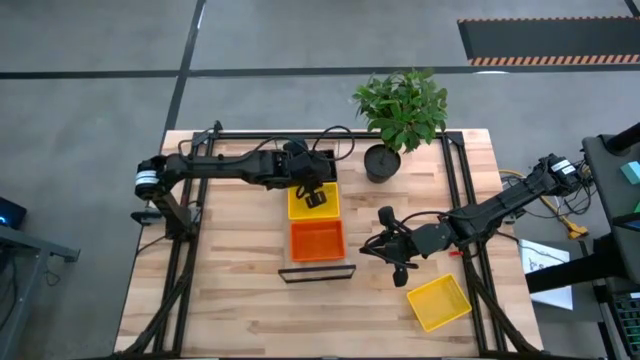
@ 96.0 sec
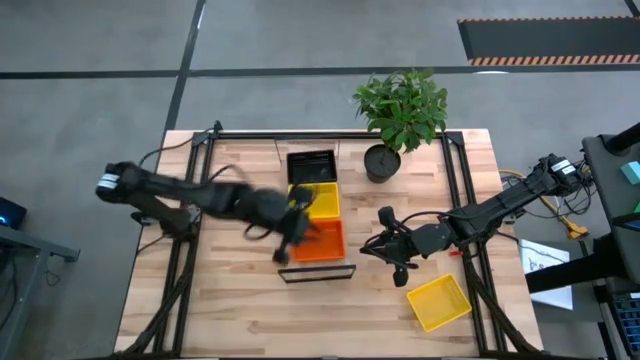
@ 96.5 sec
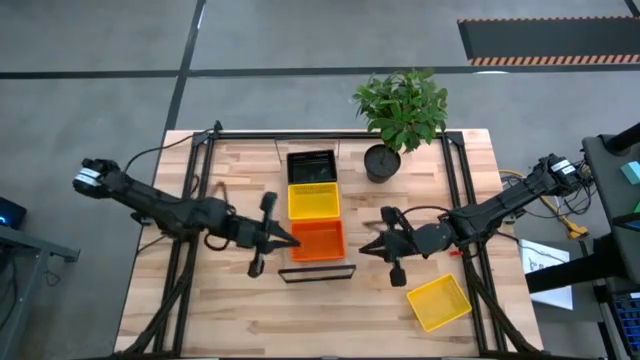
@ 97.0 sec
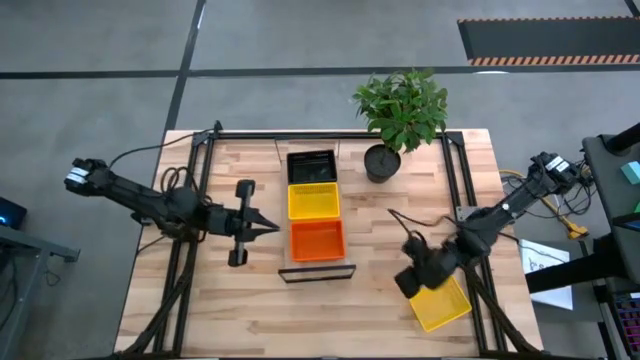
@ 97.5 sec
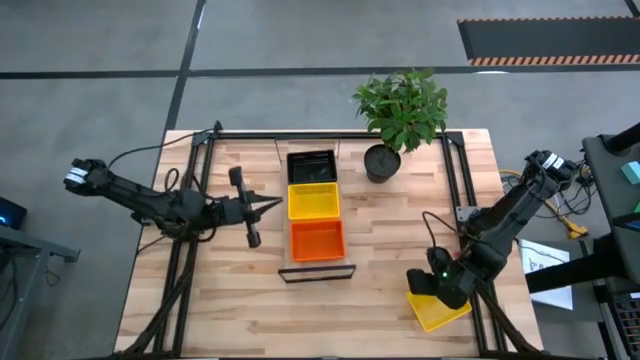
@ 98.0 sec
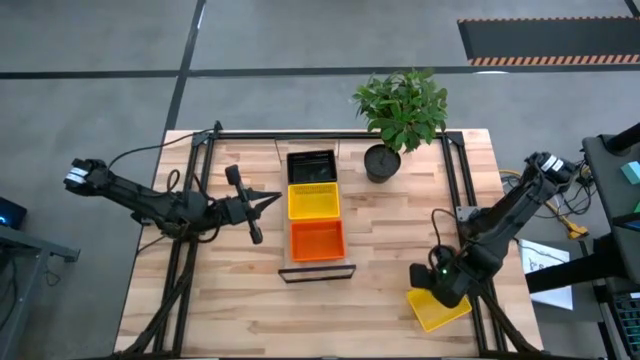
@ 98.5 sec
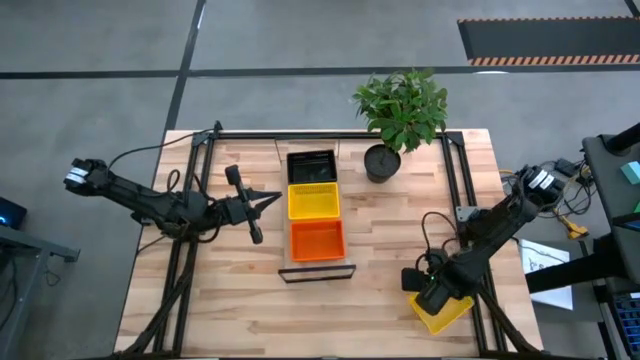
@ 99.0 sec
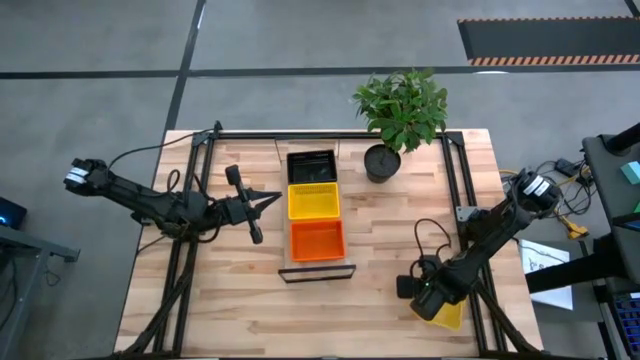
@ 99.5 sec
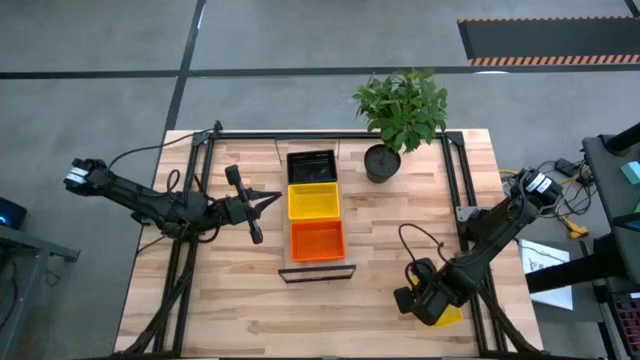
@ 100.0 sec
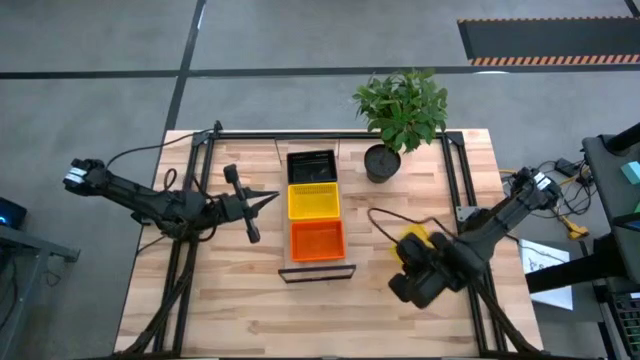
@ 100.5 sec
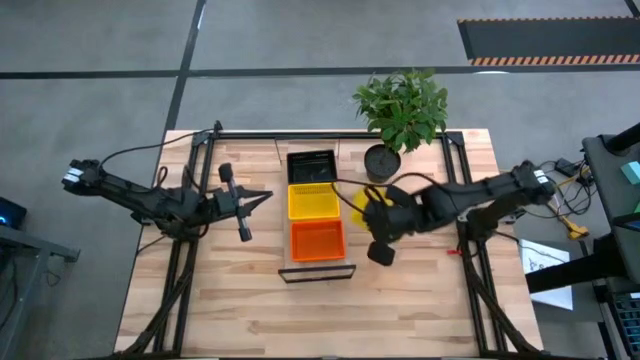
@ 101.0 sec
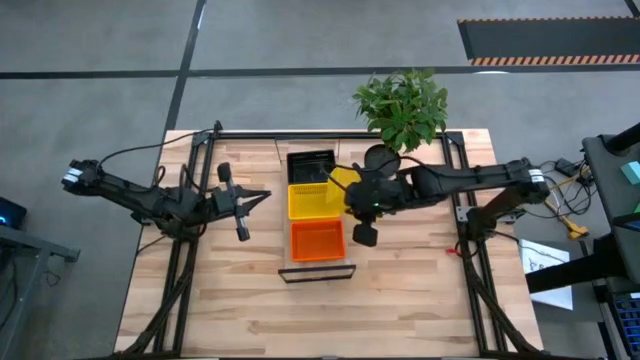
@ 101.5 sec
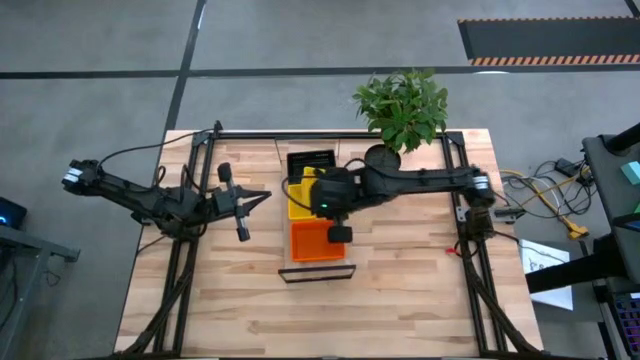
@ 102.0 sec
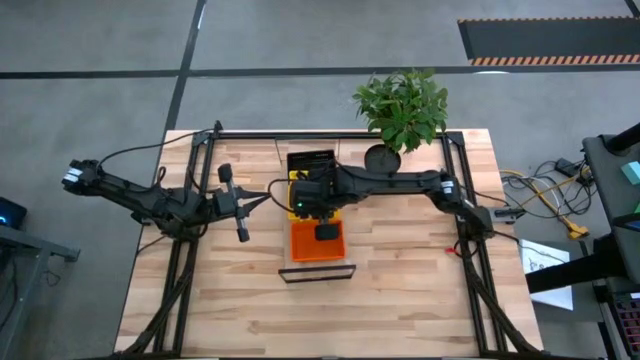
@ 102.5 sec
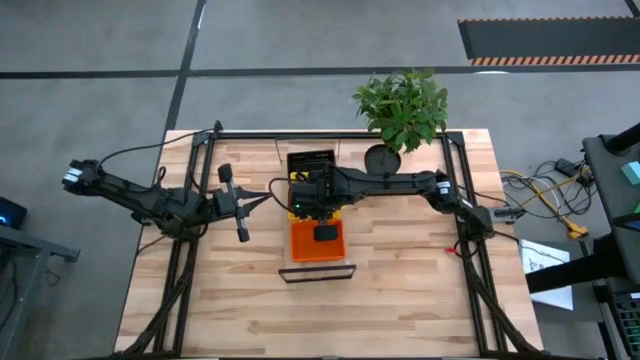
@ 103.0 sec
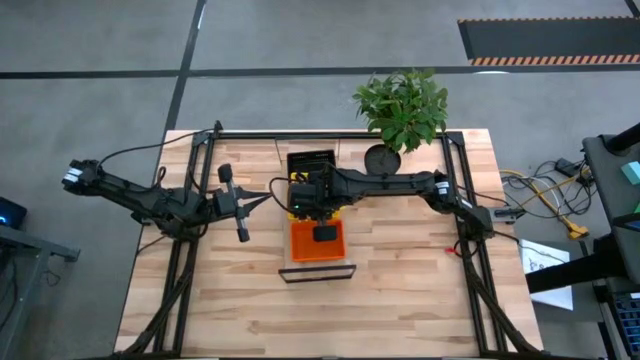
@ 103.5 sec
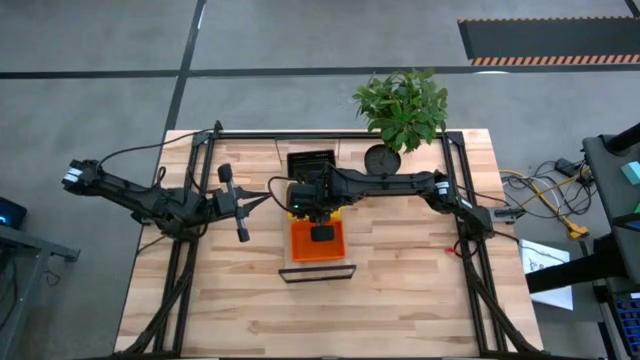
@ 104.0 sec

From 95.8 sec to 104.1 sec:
Task: Stack baskets on shelf by color
Stack the yellow bin on top of the yellow bins on the shelf

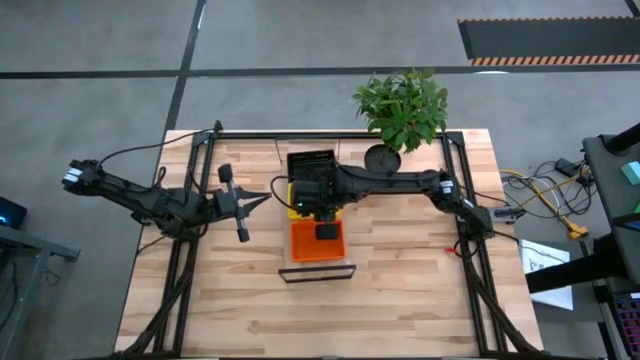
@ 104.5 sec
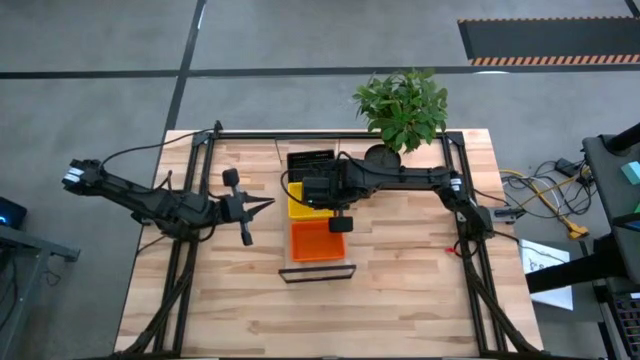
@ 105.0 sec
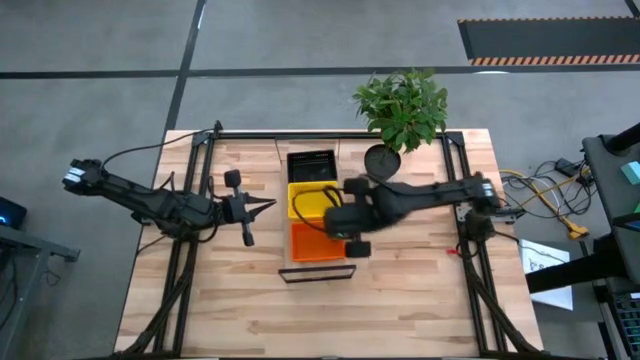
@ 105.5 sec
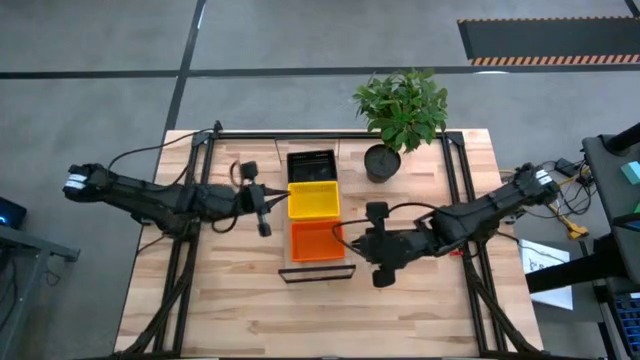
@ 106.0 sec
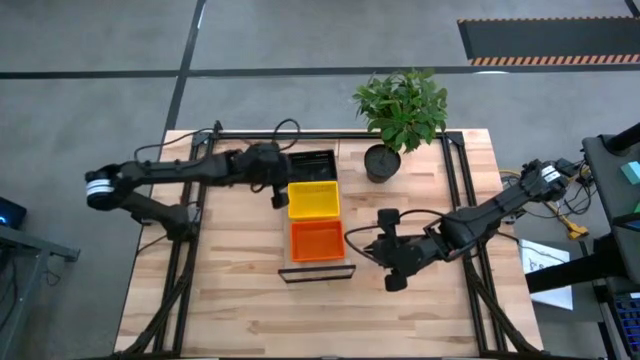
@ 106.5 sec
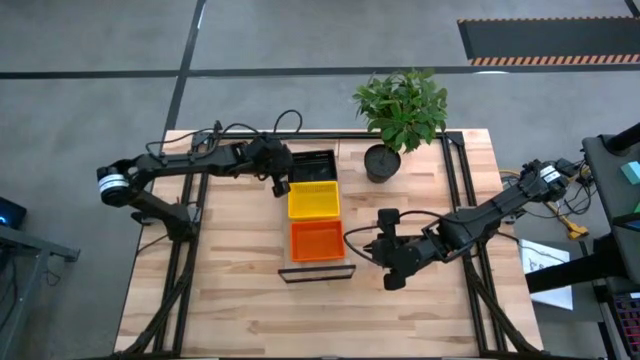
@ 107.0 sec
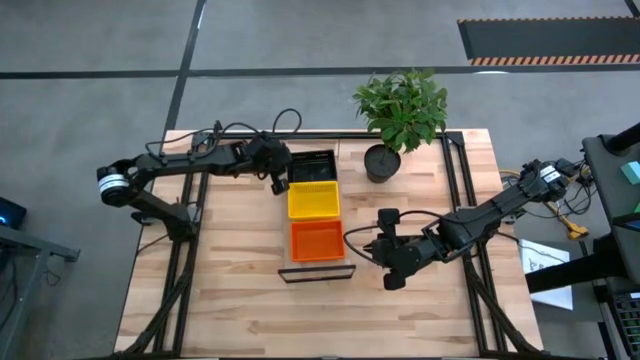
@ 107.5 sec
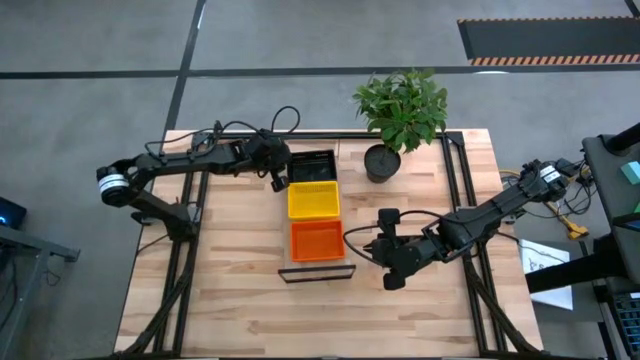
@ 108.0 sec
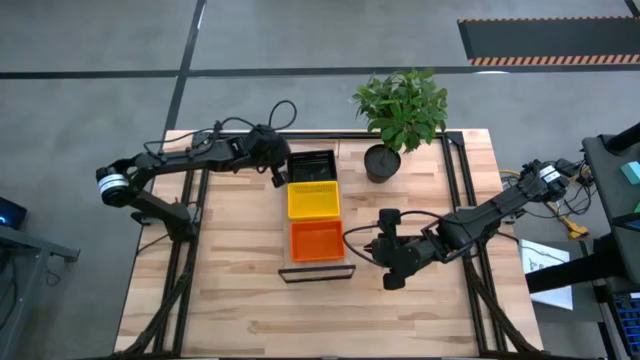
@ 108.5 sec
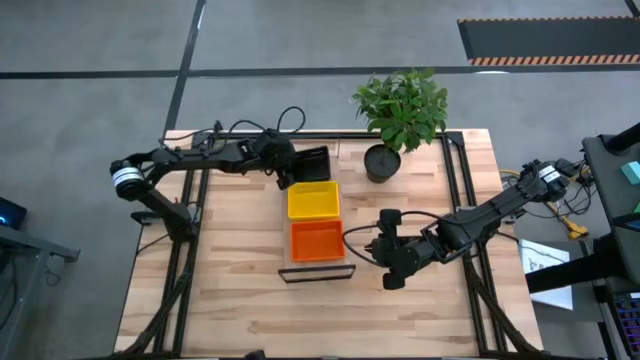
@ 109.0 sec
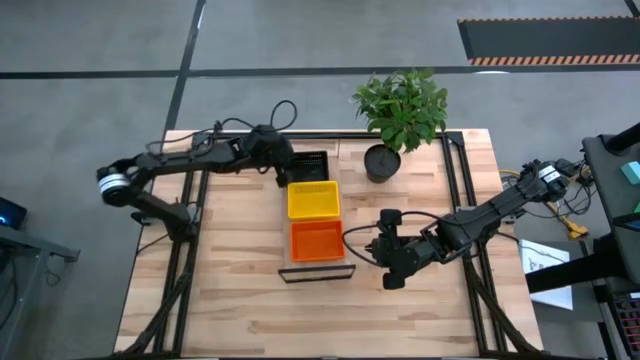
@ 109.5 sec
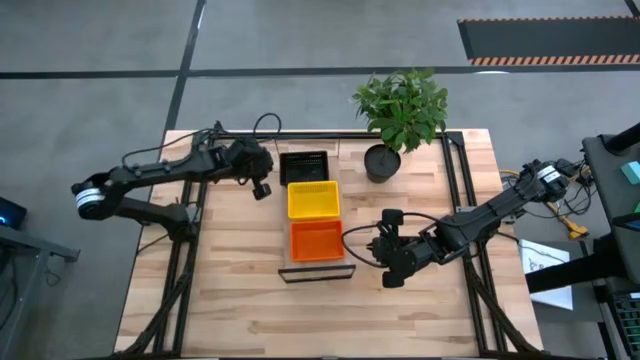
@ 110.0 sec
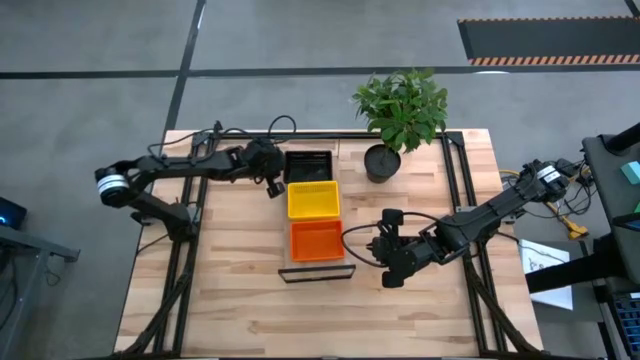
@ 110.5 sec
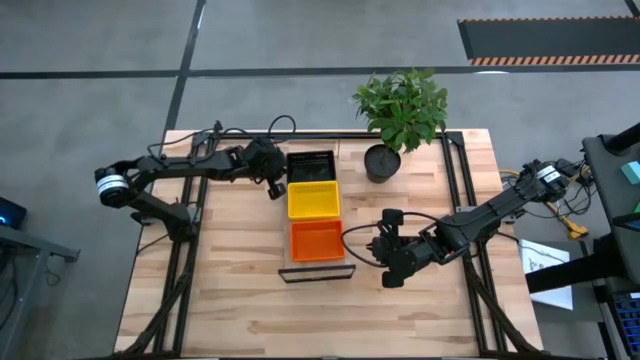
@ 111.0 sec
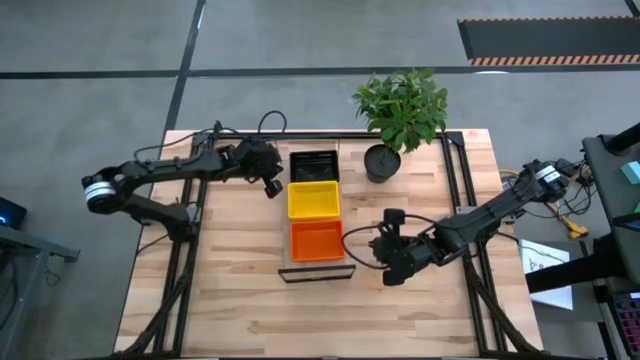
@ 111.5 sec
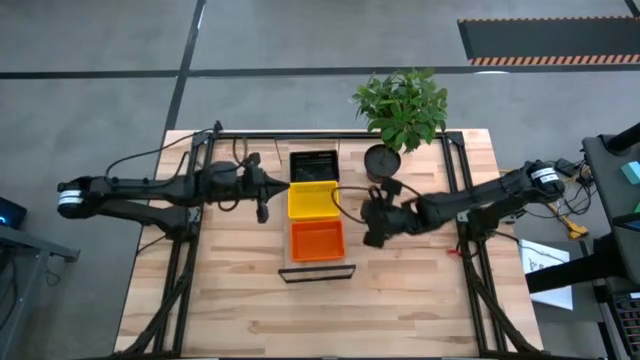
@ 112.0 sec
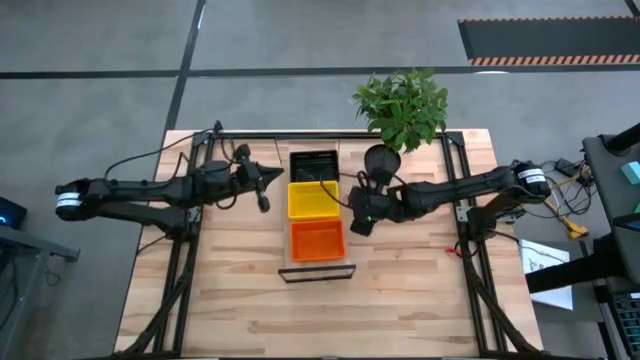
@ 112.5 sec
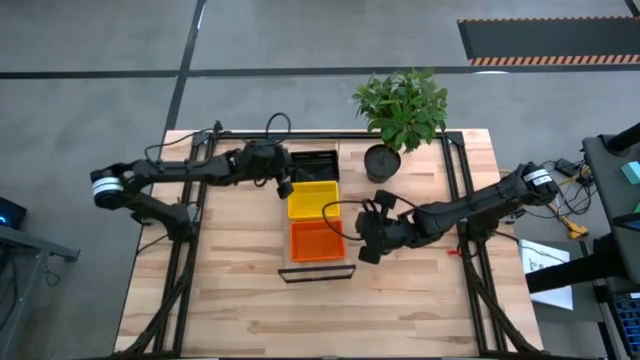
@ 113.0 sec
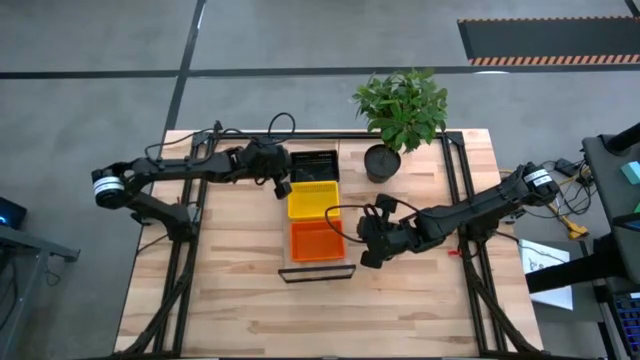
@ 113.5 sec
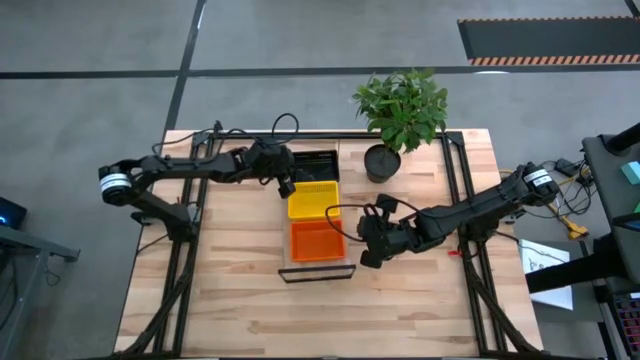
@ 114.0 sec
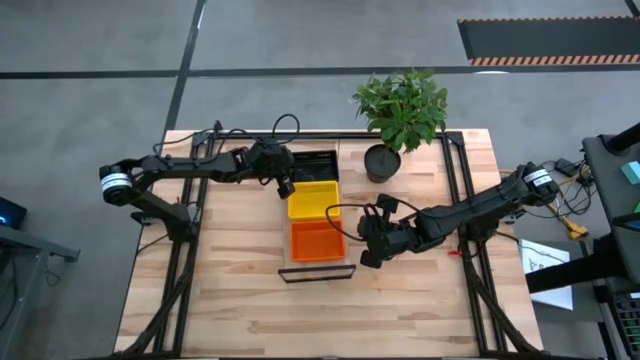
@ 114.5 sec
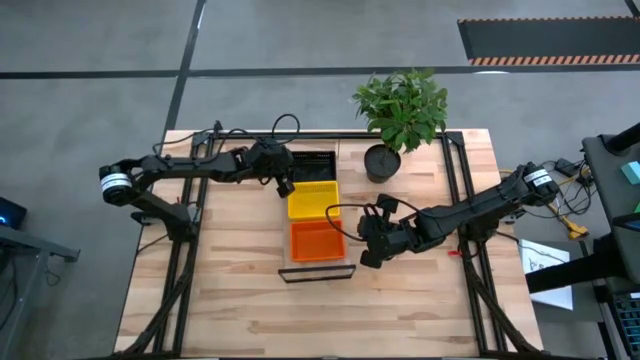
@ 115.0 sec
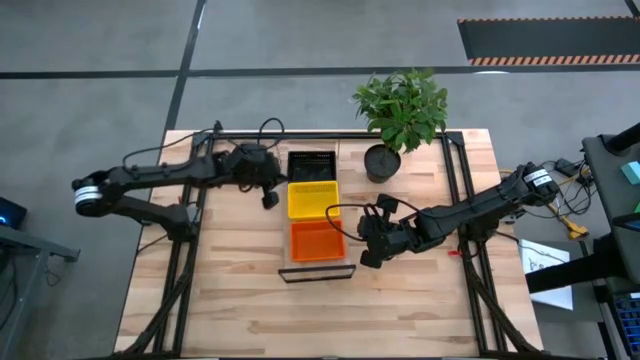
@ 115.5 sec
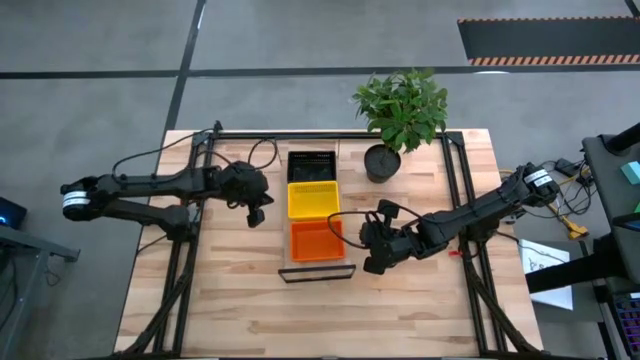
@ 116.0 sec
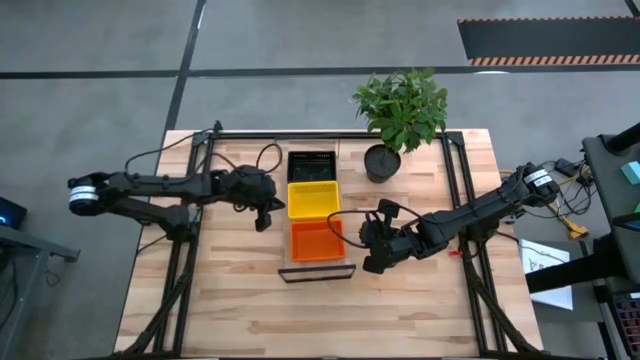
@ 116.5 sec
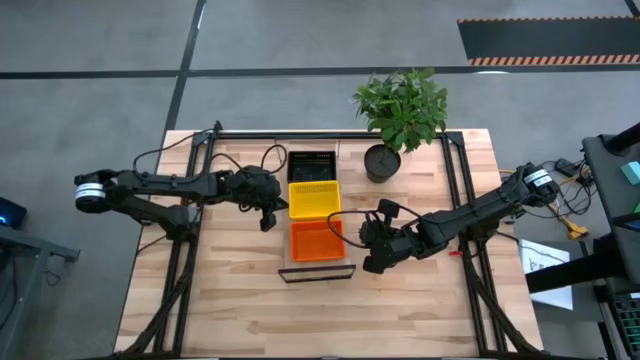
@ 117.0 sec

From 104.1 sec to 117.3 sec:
Adjust the bins on the shelf

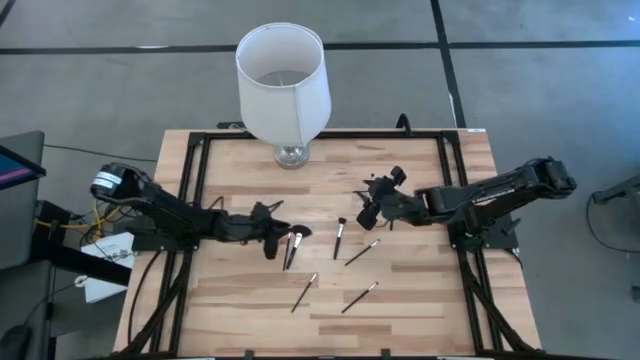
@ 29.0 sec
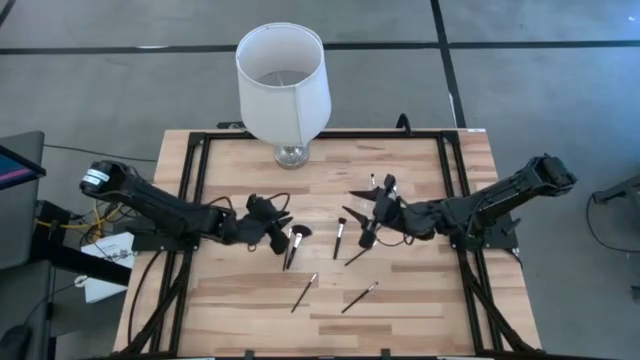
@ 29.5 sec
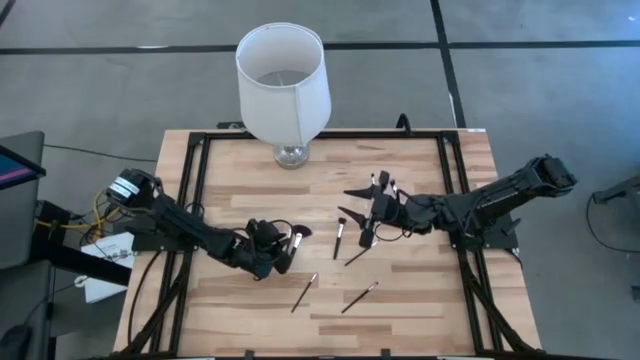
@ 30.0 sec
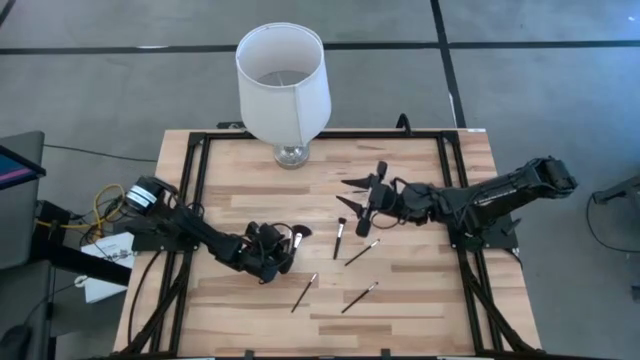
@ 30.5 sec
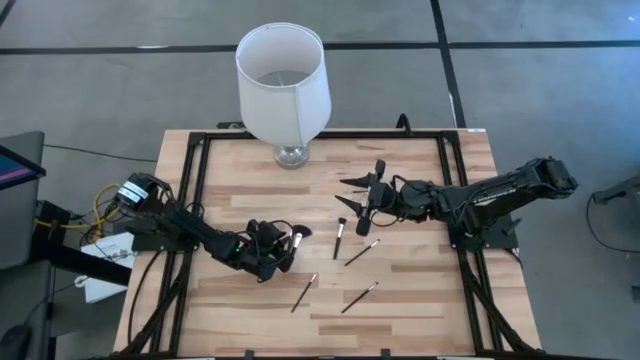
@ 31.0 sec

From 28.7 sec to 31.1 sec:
Task: Pick & Place Makeup Supplies
Put the black makeup brush into the transparent organizer
